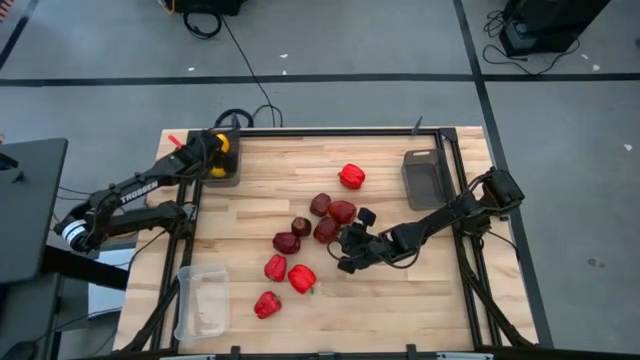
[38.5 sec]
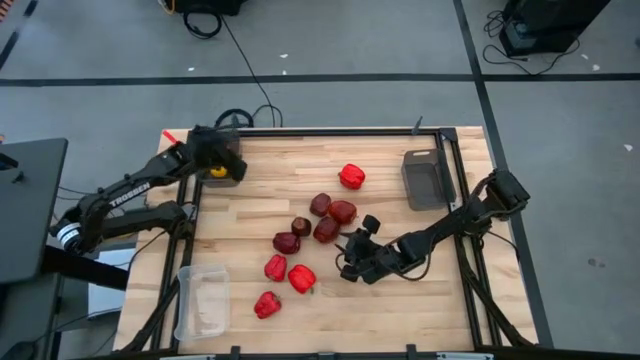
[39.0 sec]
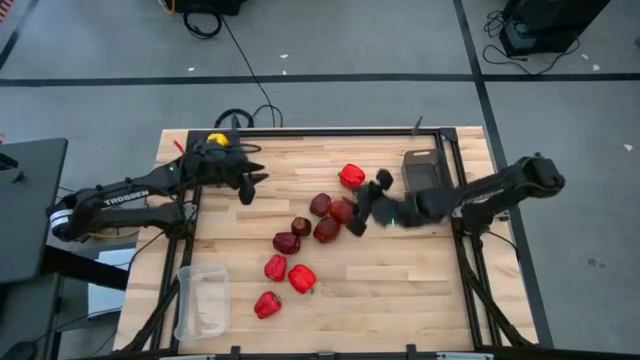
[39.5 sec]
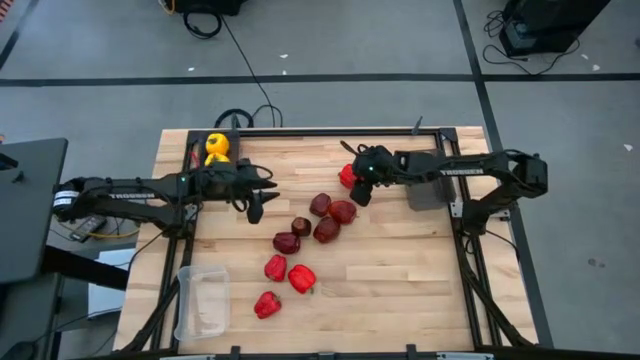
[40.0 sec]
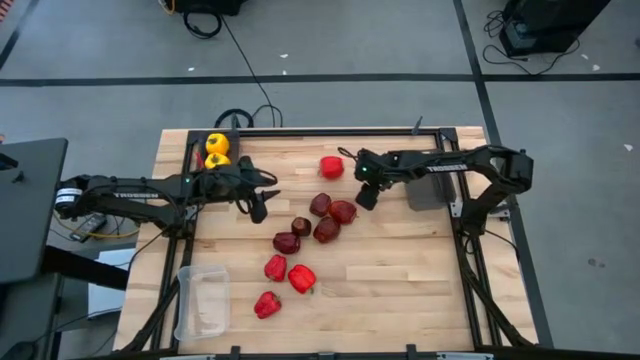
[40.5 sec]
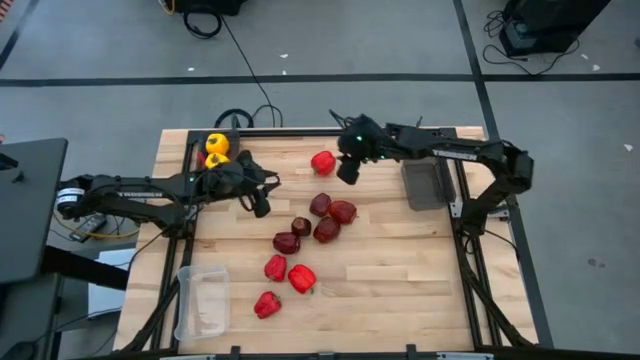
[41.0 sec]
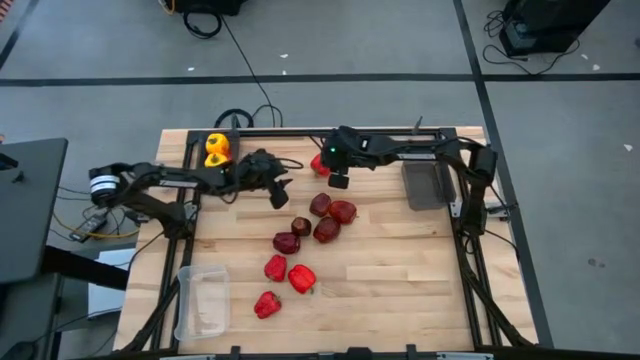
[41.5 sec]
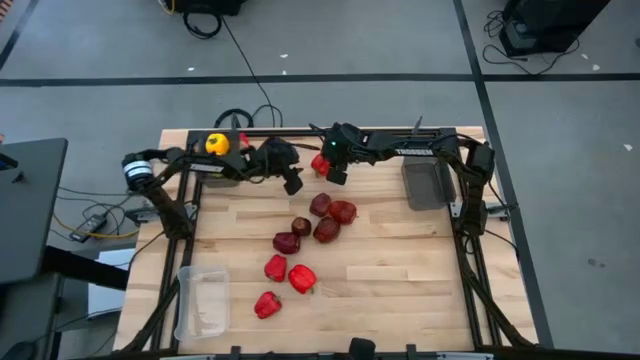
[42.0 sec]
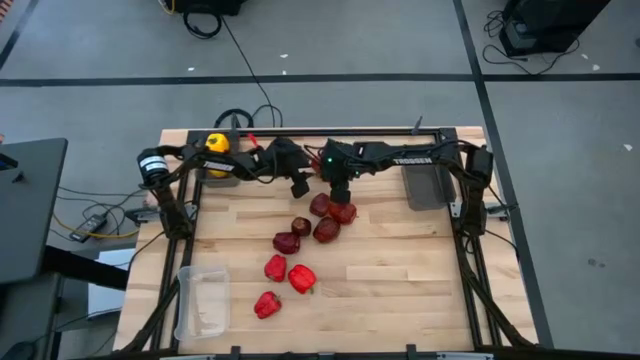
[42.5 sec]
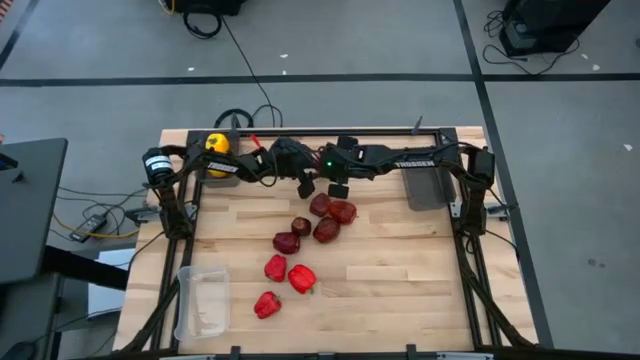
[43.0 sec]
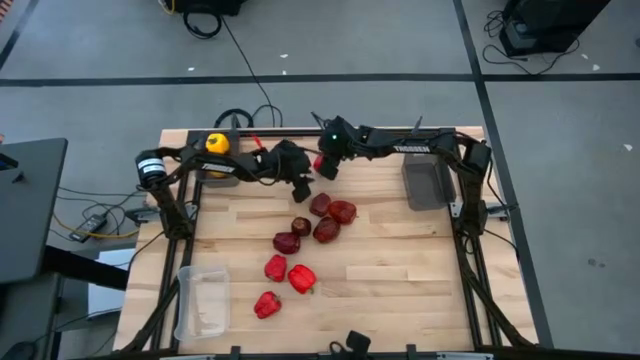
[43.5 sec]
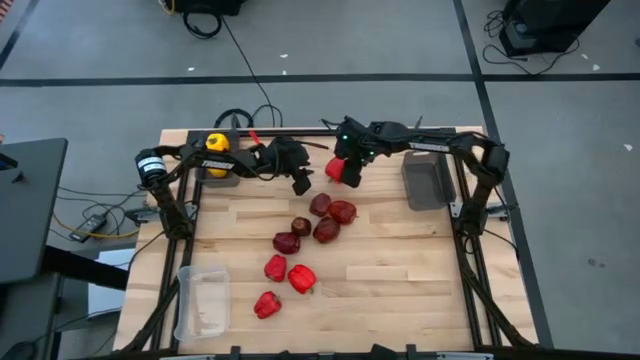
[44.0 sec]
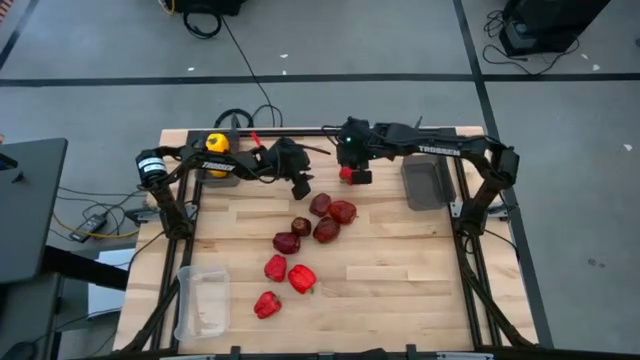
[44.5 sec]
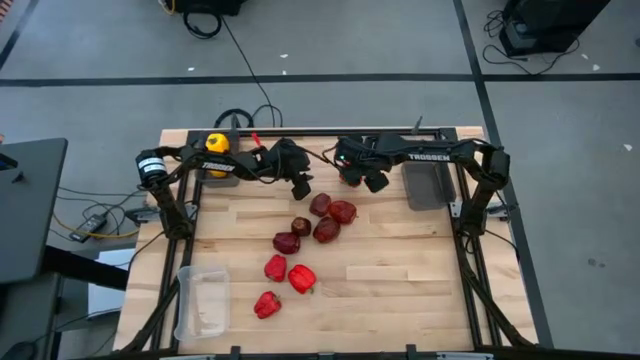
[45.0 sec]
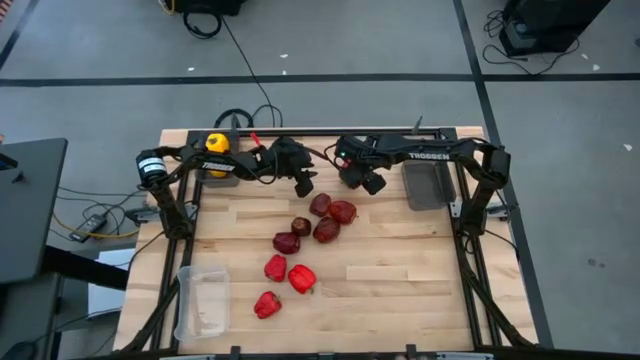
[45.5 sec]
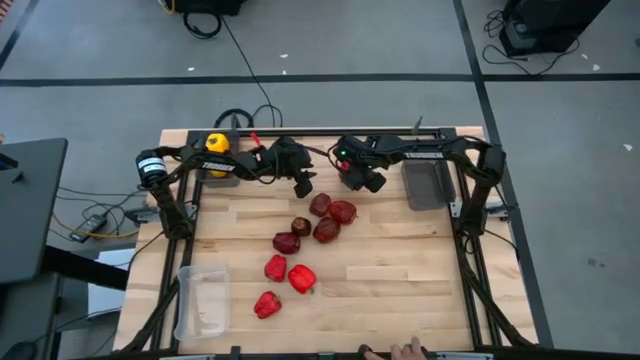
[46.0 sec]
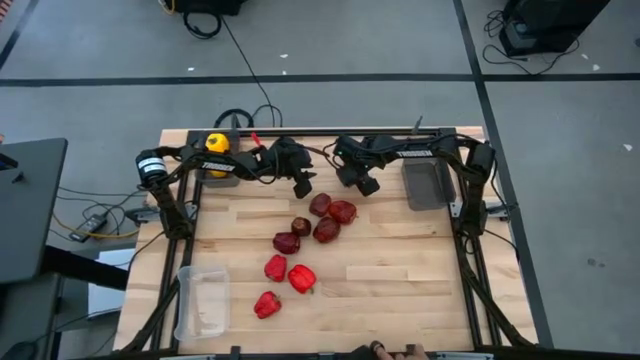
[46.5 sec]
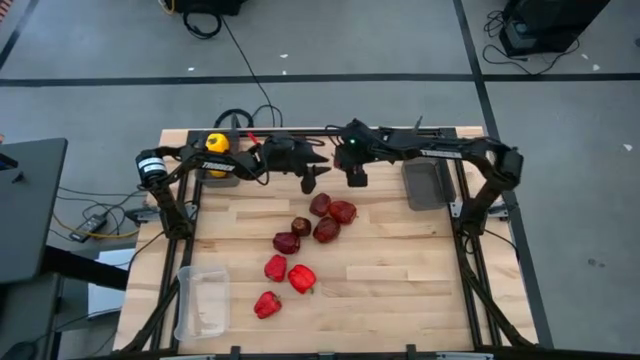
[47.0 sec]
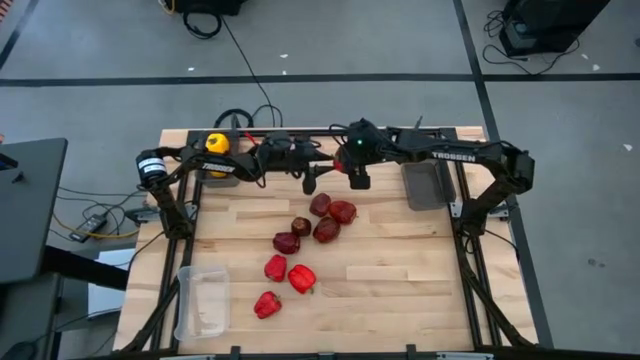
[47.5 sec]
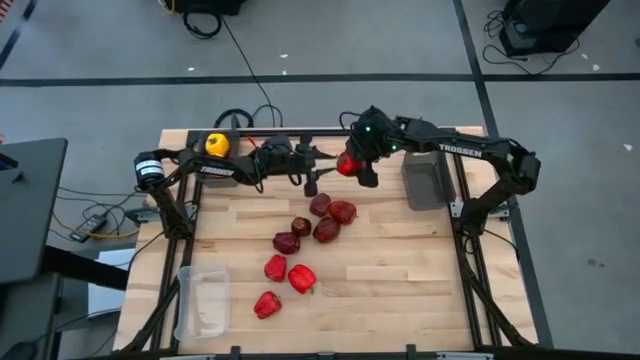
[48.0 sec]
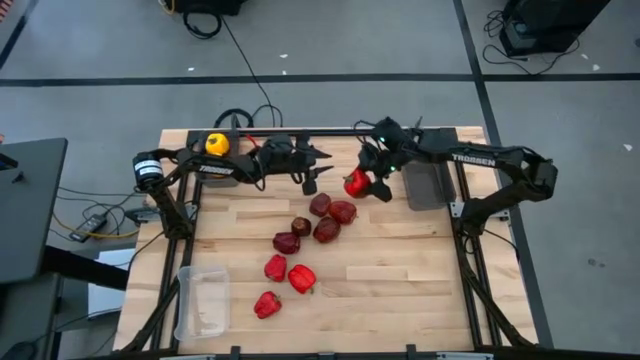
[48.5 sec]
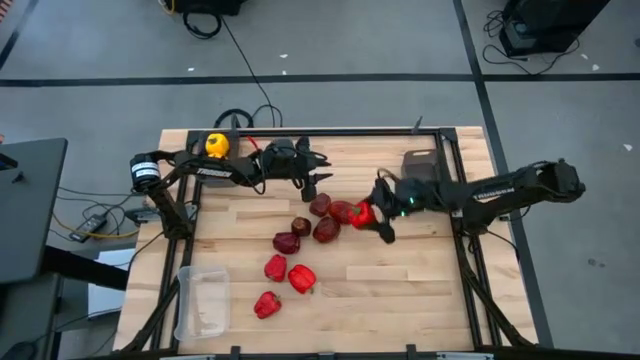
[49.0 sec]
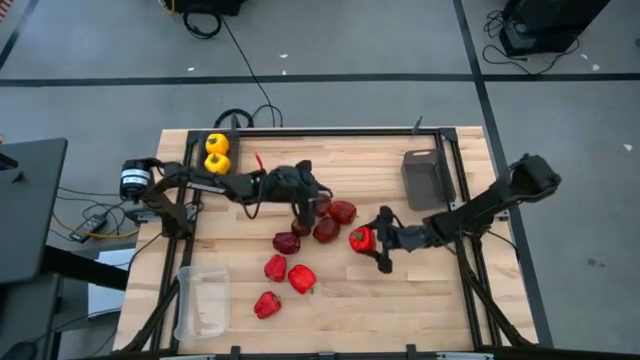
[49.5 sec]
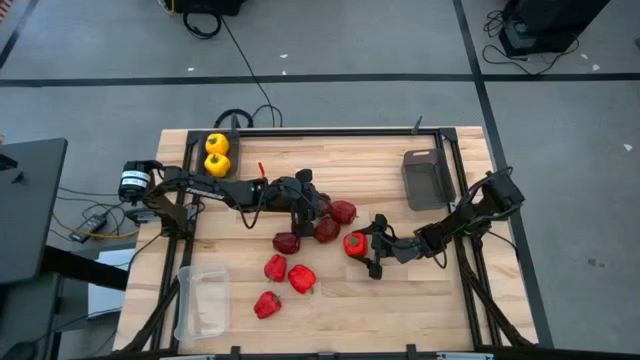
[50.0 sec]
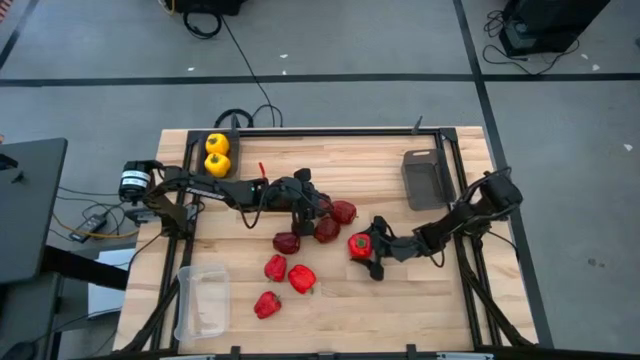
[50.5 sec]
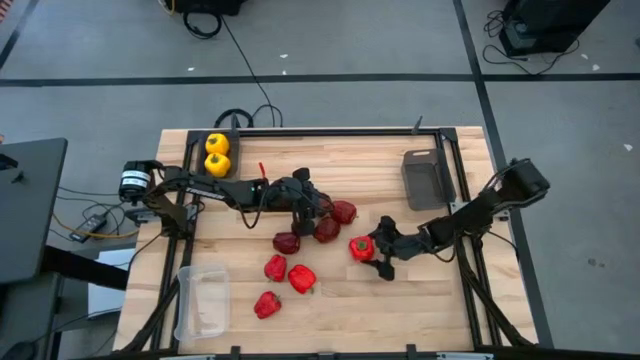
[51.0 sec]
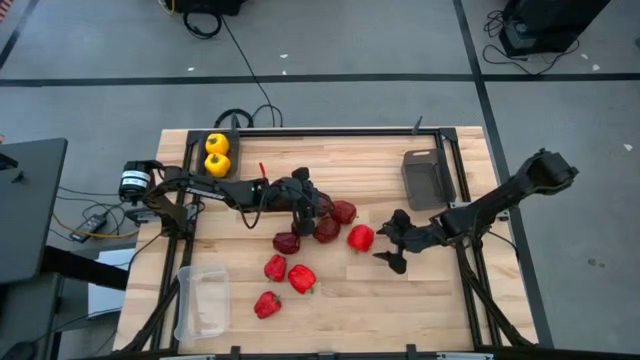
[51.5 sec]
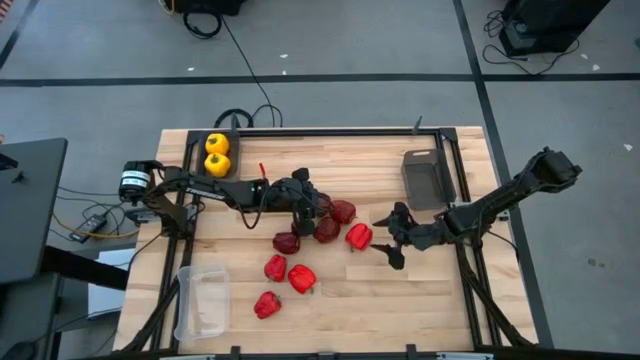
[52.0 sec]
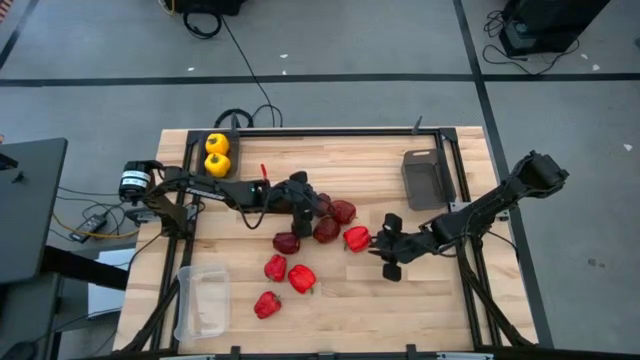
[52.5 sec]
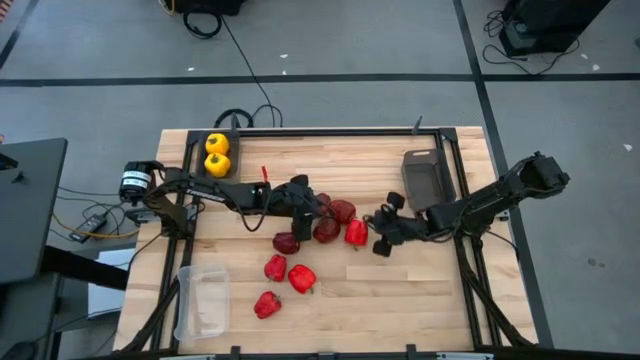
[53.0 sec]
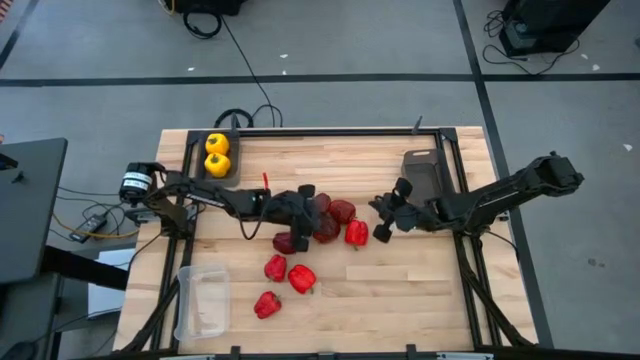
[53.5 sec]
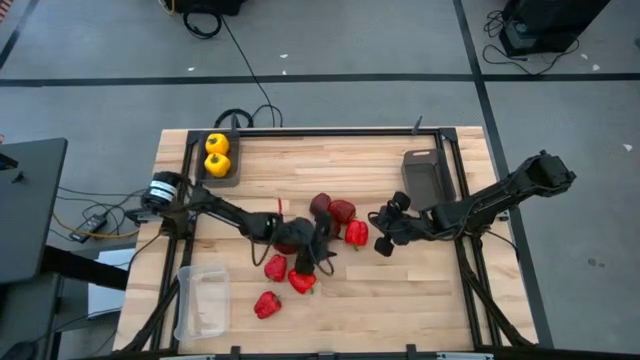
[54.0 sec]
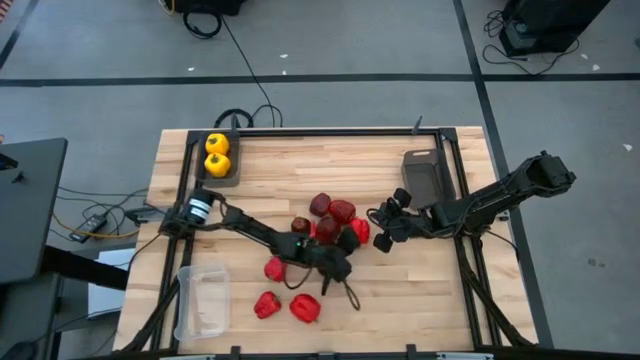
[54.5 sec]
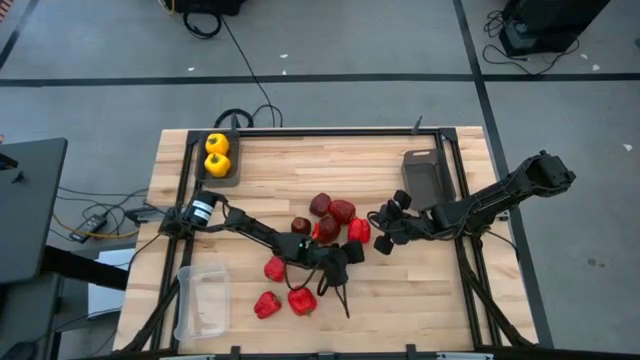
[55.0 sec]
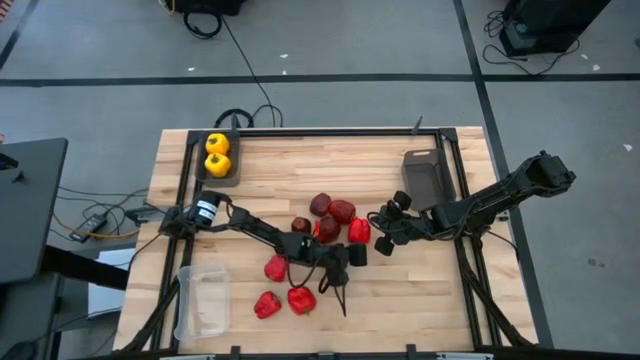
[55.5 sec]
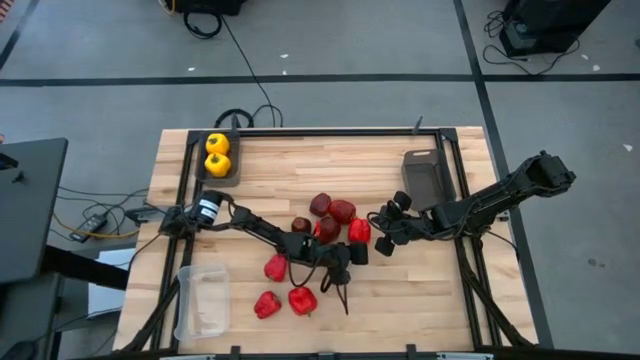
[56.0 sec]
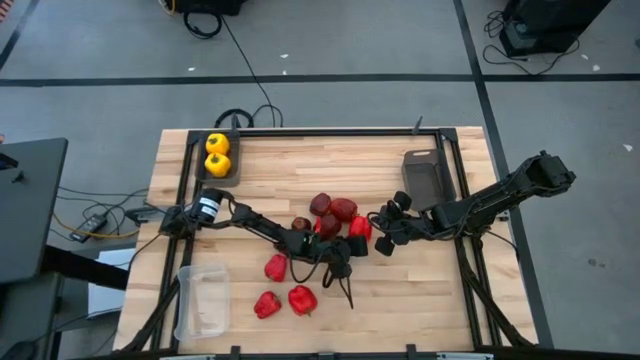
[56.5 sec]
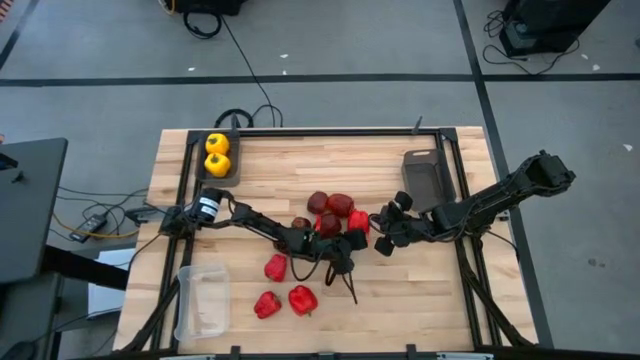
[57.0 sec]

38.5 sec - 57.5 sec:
Task: Sort produce into baskets
Put the red bell pepper into the right black transparent bin

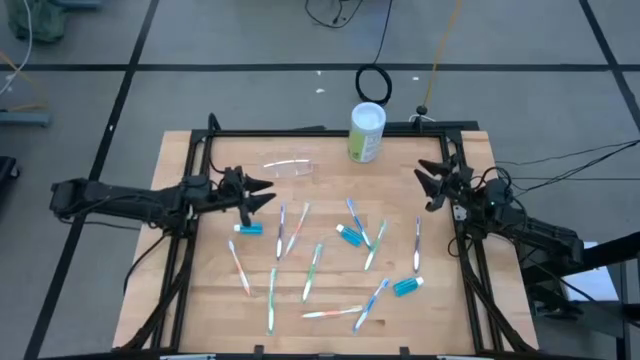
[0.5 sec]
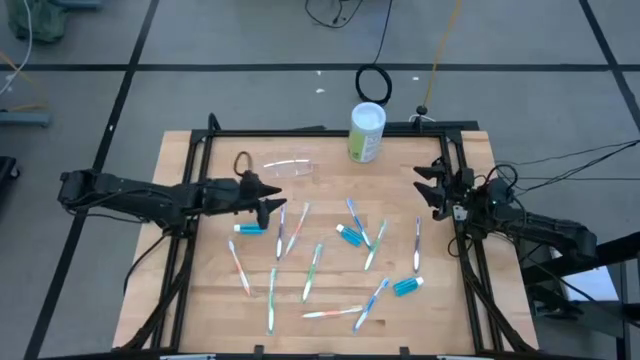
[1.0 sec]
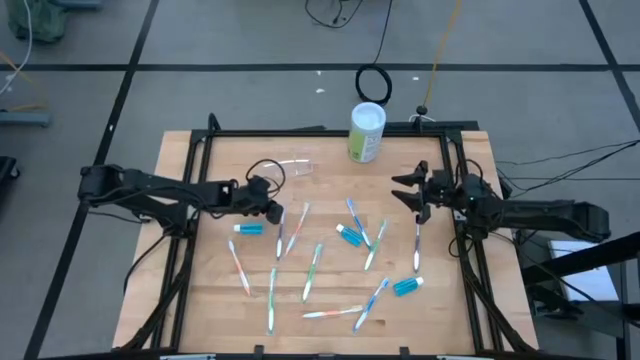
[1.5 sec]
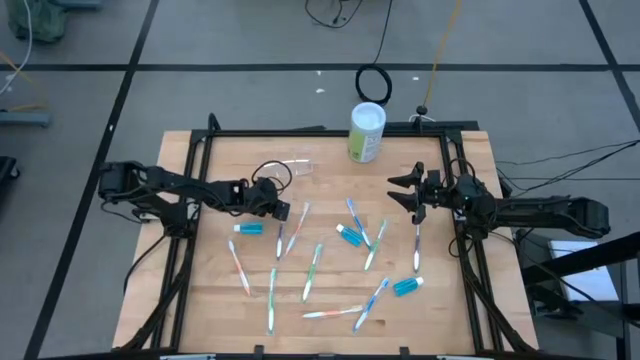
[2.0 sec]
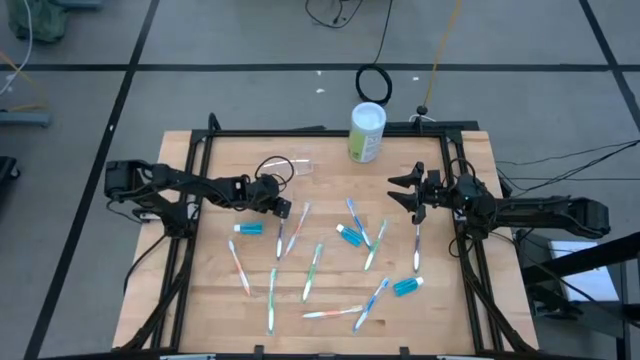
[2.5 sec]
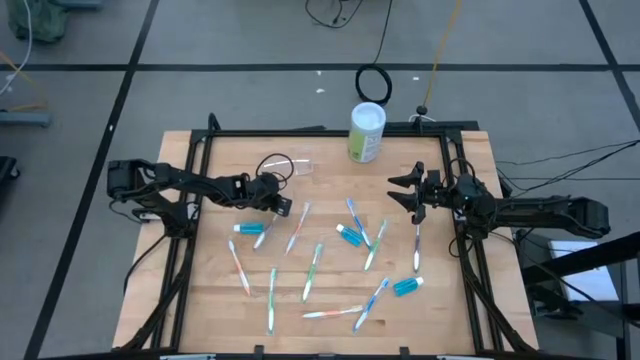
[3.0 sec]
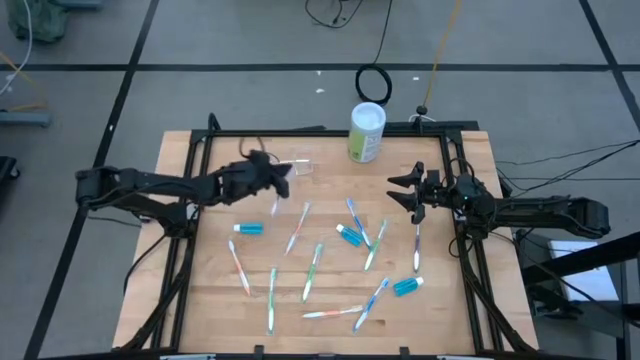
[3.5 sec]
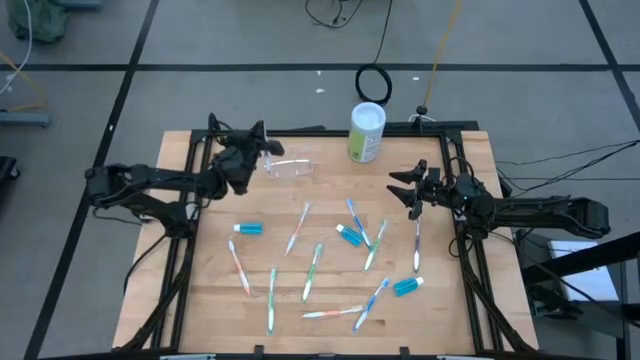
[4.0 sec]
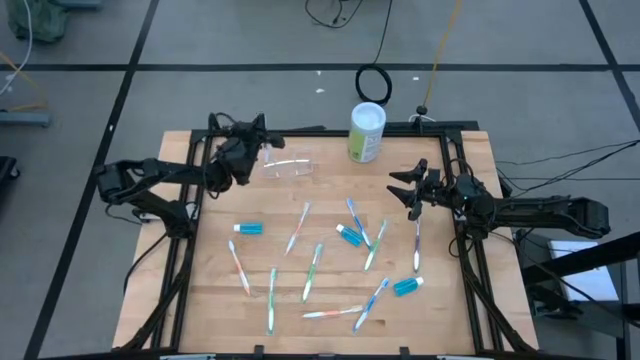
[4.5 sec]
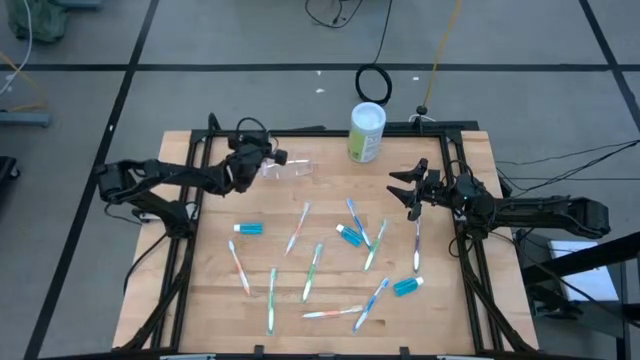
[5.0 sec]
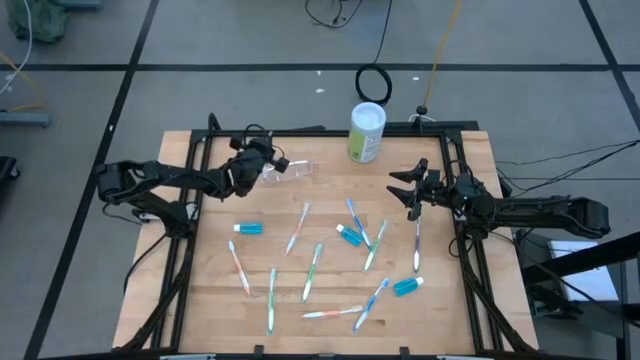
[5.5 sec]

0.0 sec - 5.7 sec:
Task: Pick & Place toothbrushing station
Put the left purple toothbrush into the transparent organizer
